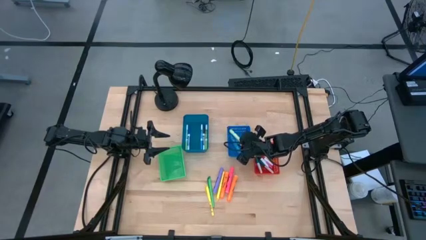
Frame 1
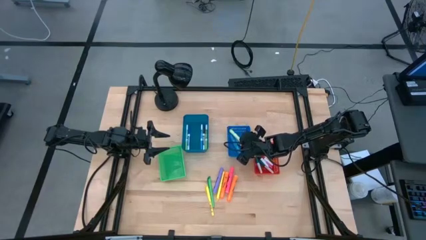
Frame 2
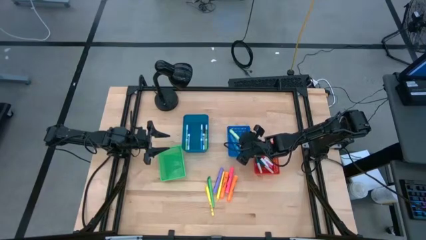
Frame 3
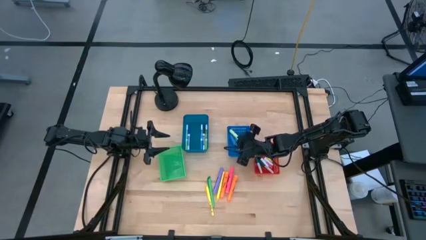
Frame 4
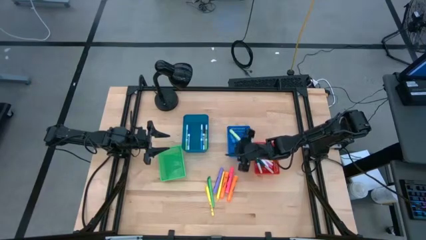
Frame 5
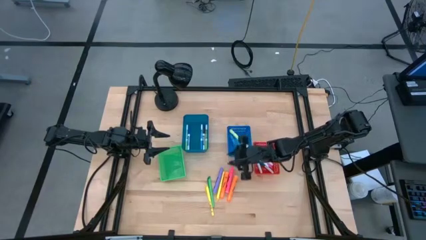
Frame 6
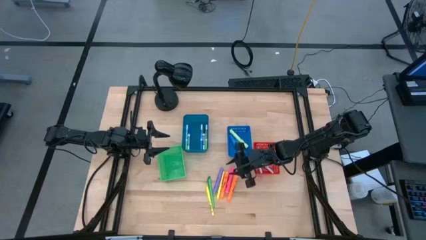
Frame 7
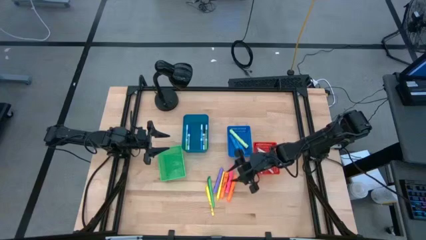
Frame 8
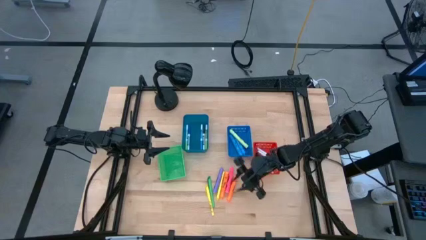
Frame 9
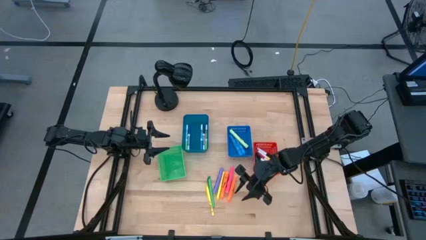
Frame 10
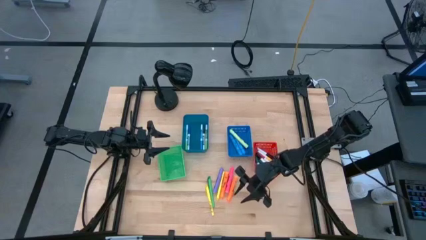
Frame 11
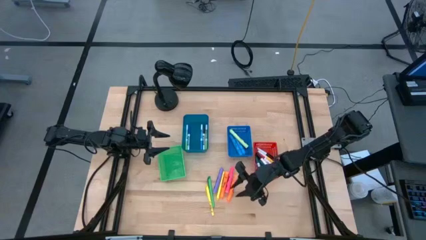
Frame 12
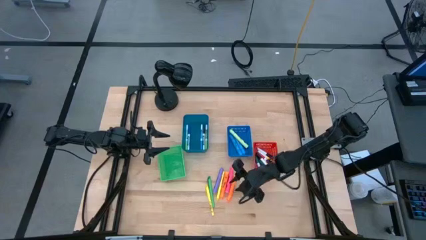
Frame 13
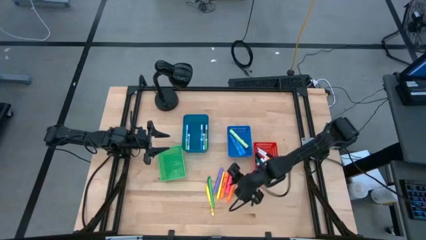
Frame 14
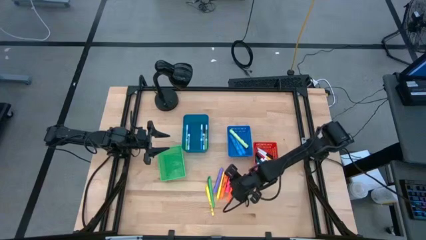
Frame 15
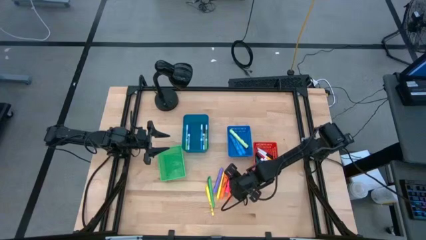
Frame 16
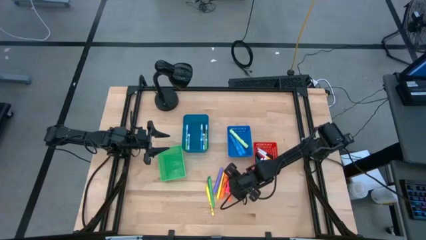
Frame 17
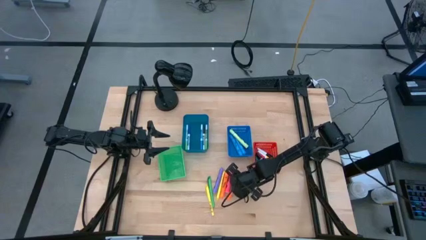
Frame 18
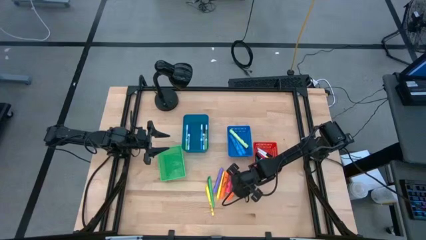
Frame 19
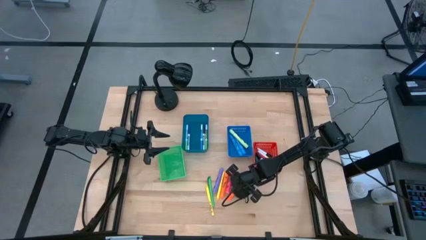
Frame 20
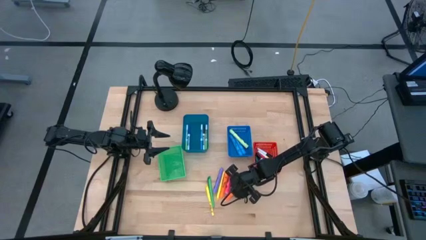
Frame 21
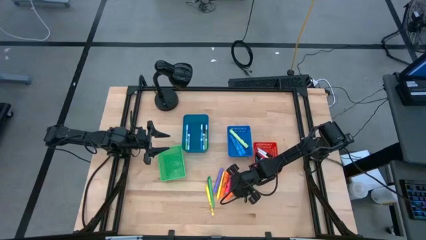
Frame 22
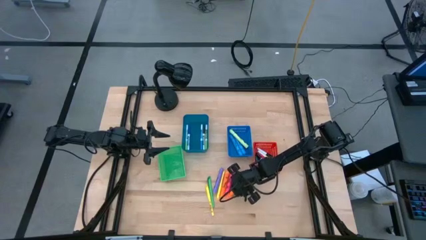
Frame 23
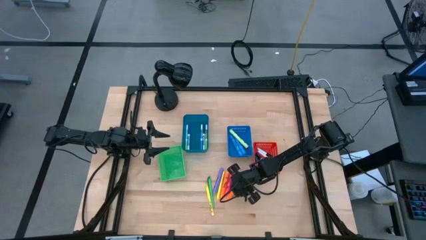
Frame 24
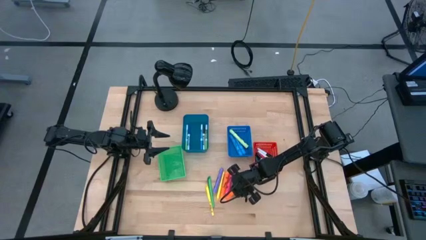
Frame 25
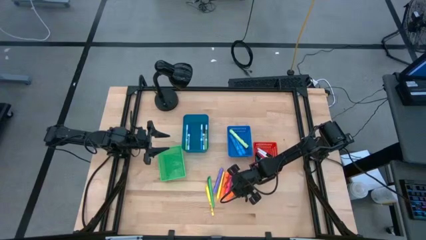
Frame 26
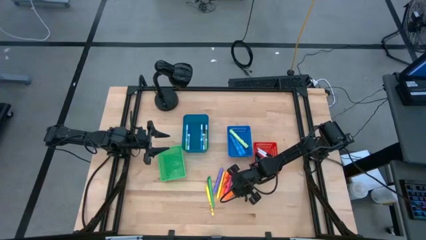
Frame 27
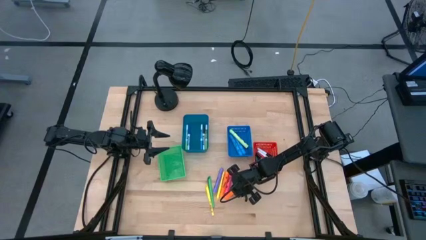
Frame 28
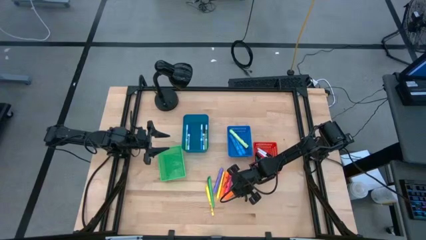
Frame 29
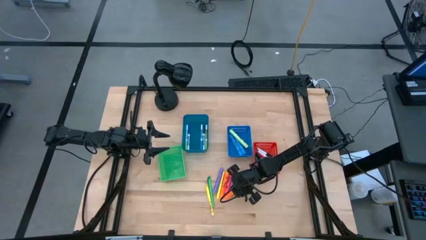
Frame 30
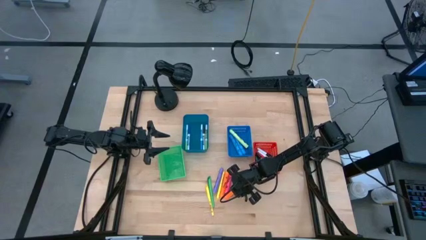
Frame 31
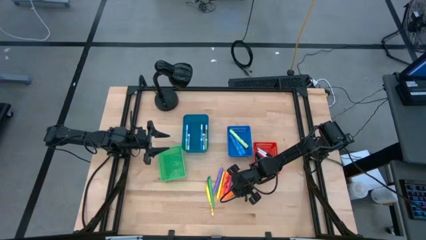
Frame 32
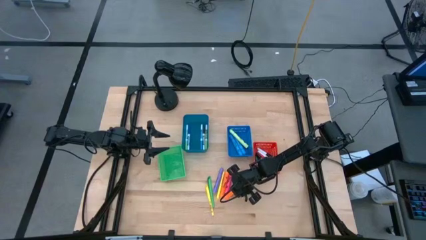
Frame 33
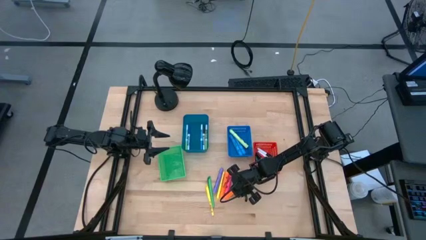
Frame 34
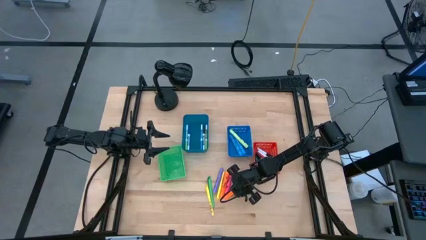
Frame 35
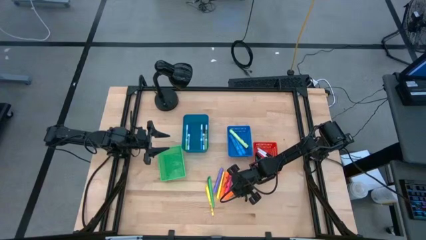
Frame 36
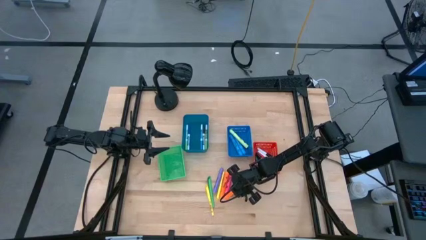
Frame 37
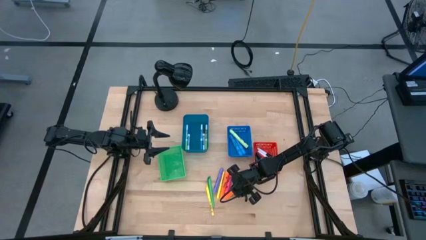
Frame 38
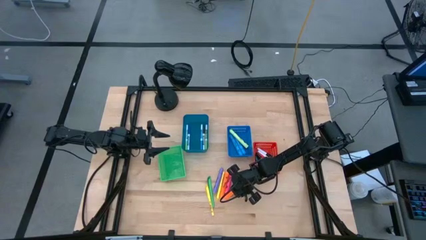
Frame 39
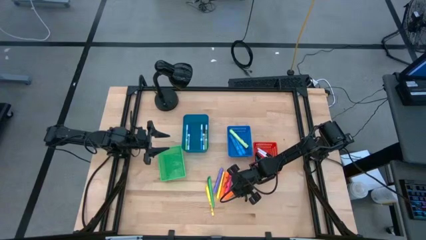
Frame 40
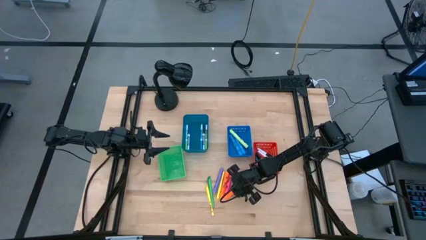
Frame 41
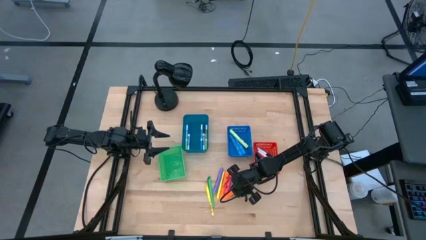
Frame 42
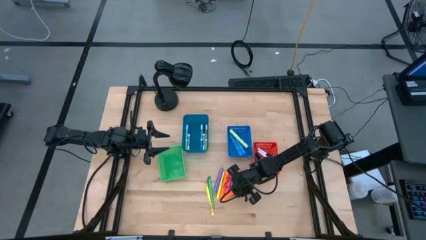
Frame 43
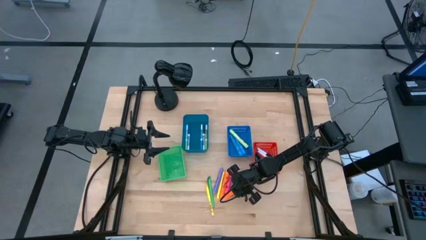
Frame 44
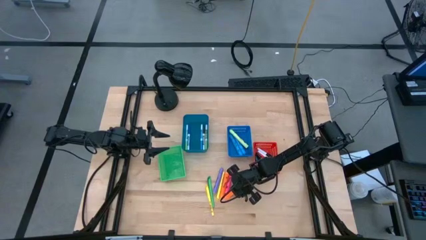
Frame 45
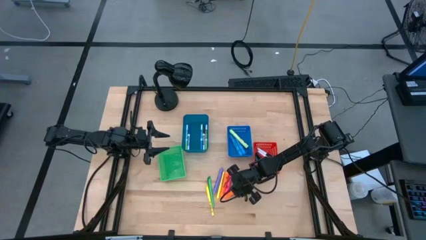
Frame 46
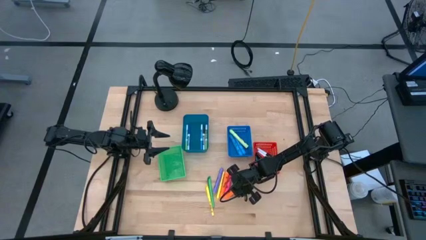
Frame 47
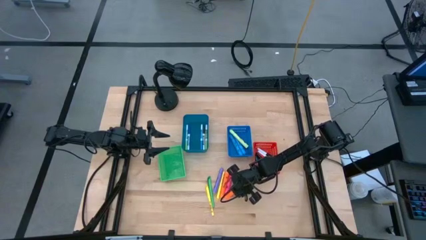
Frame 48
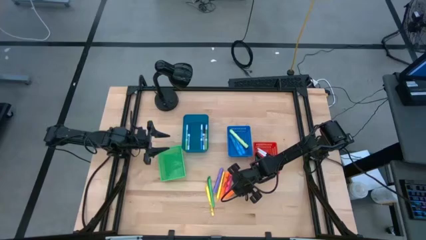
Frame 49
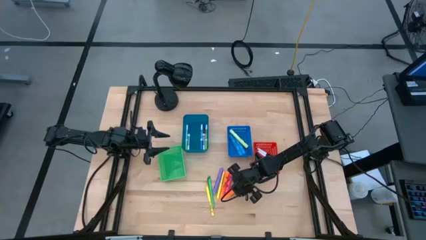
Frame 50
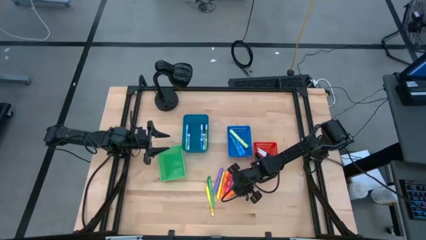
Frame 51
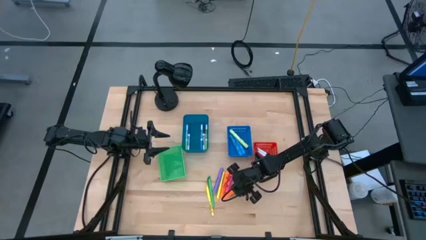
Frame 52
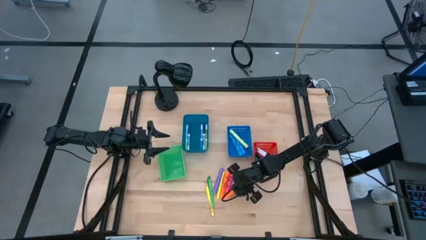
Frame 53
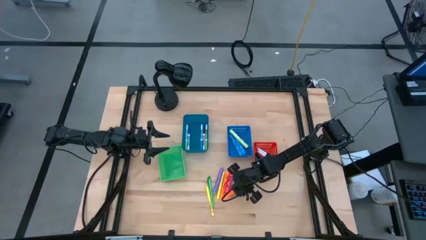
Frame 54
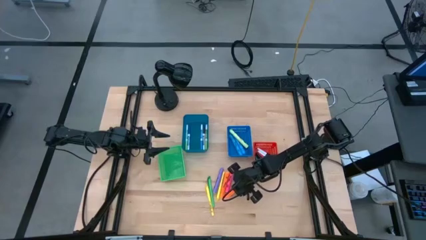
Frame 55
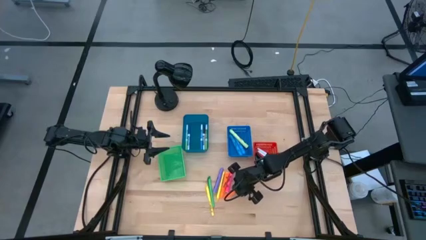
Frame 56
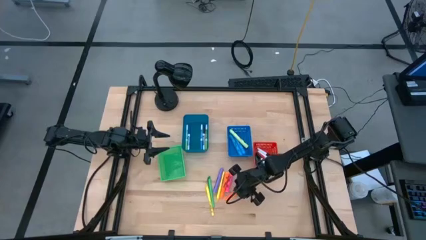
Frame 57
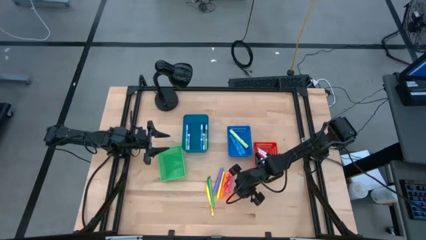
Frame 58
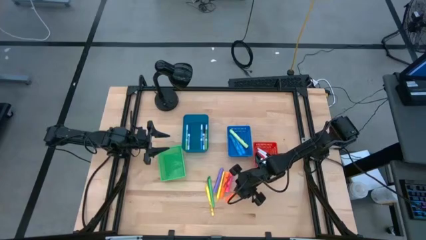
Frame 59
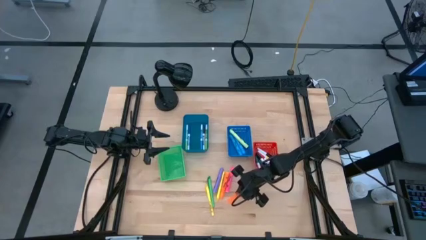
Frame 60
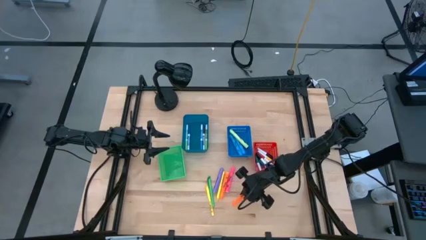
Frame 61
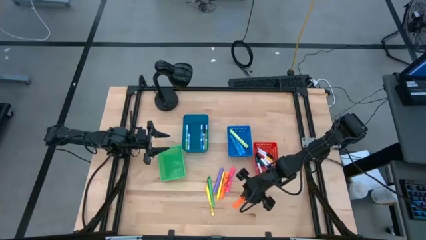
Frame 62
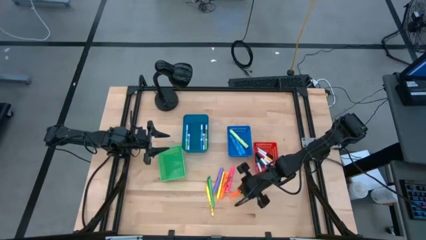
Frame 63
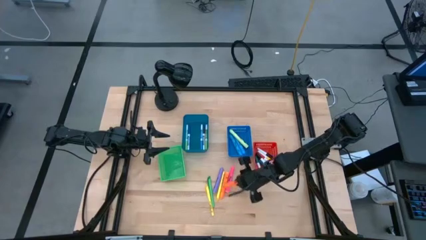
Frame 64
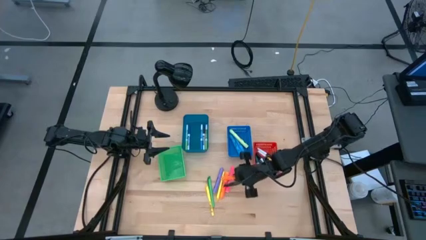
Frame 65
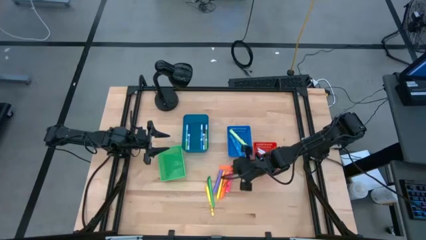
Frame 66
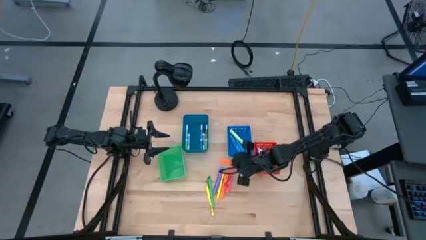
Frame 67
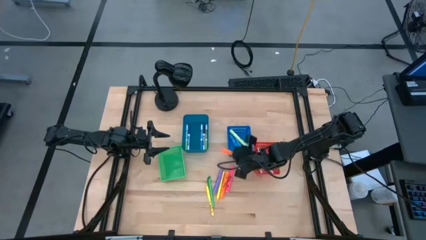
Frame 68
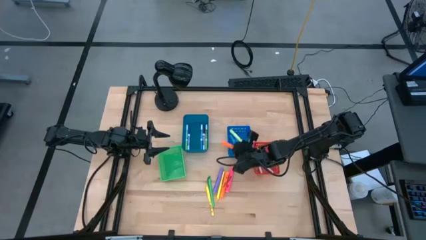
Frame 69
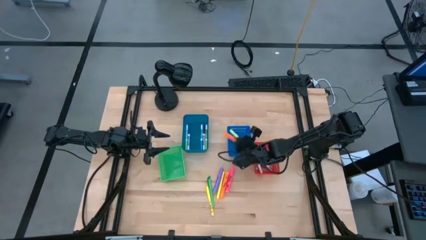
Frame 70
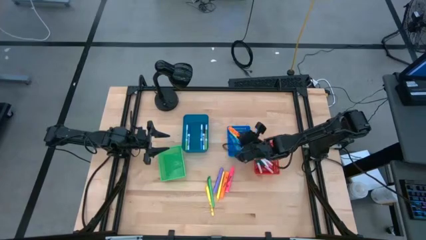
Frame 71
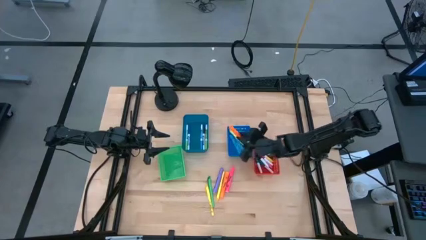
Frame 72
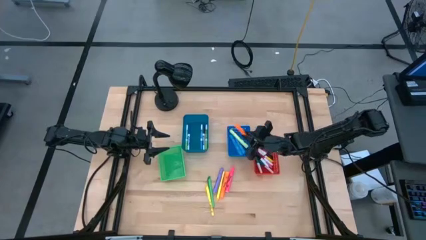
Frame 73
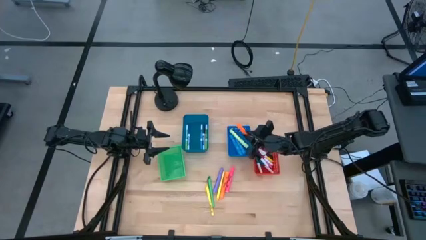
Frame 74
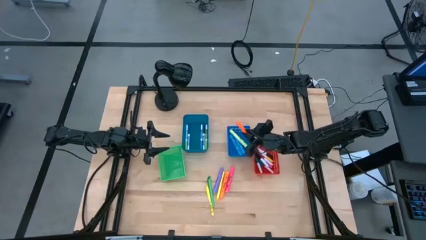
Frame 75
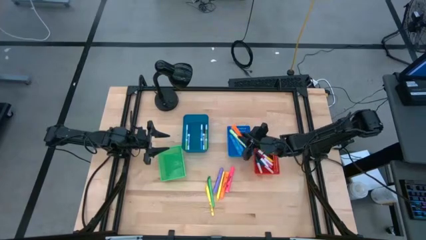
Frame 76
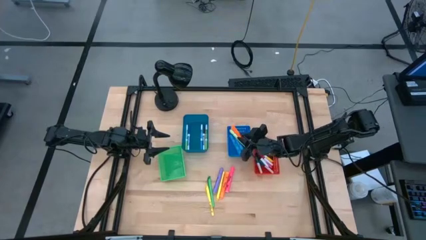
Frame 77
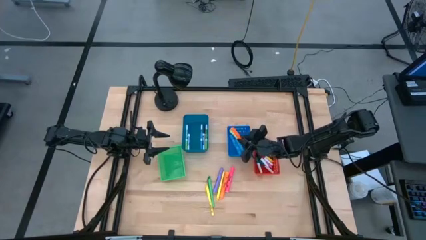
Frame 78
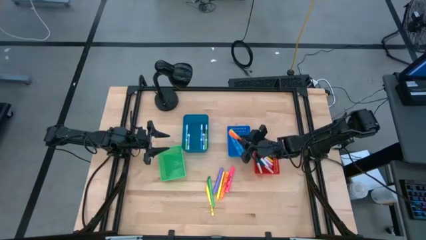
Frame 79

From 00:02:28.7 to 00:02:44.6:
Task: Pick & Place Markers
Put the right orange highlighter pen into the blue bin

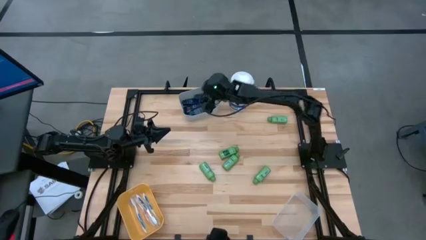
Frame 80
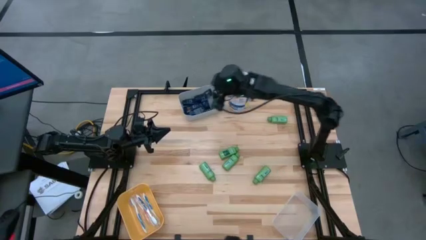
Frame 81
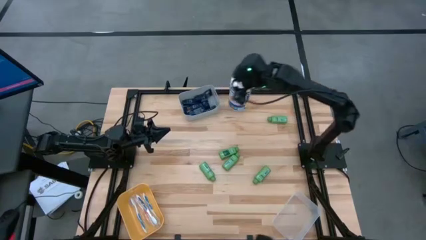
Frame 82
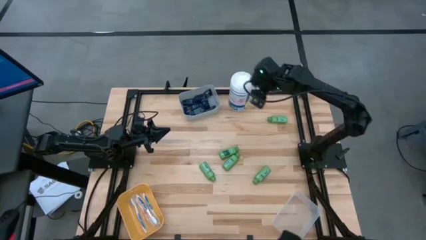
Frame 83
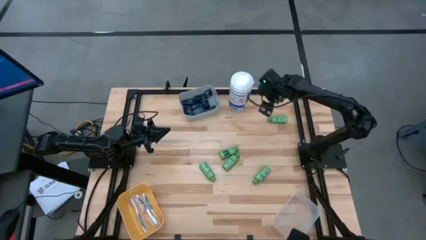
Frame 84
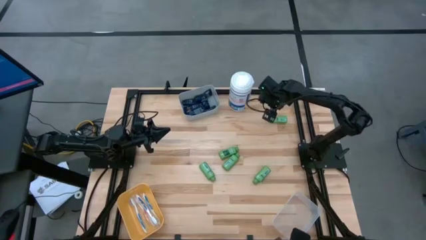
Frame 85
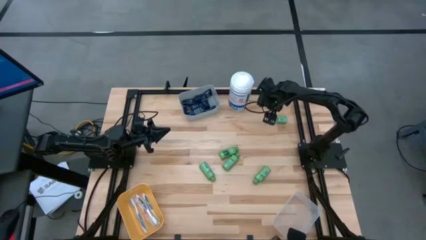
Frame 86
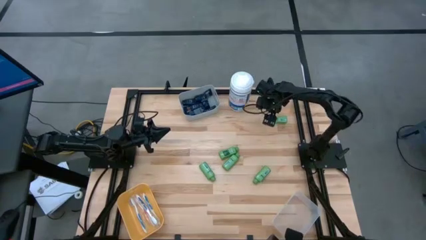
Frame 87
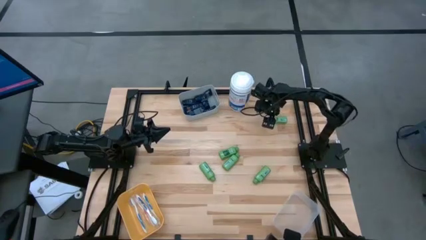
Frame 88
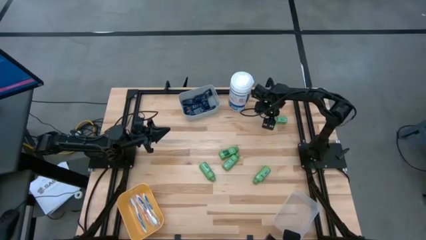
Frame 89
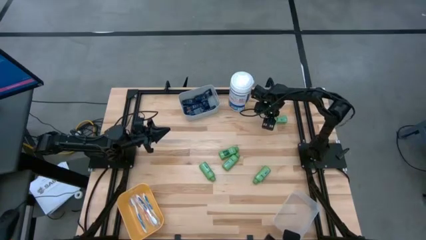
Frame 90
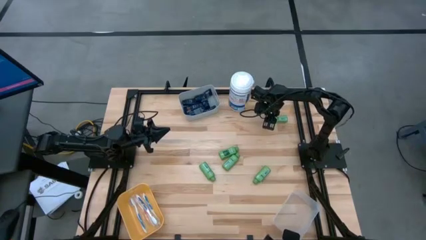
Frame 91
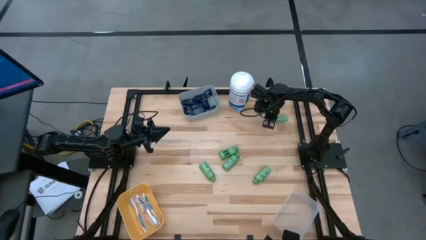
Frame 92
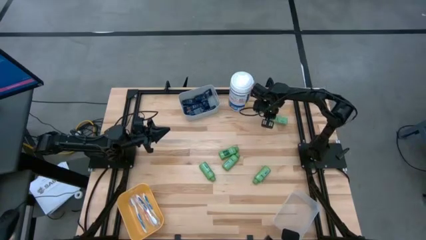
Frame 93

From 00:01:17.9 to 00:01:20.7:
Task: Pick & Place Travel size toiletries
Put the green shampoo into the transparent bin
